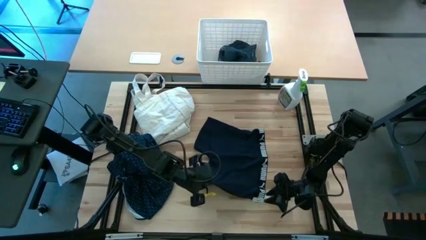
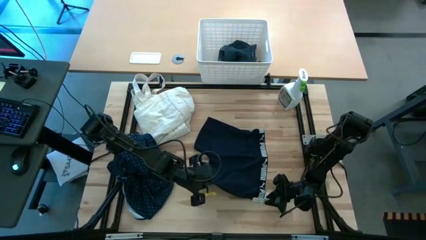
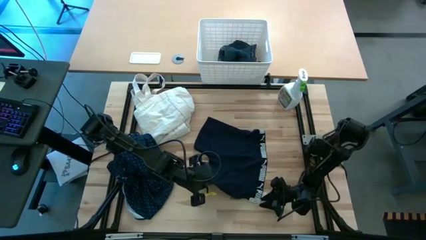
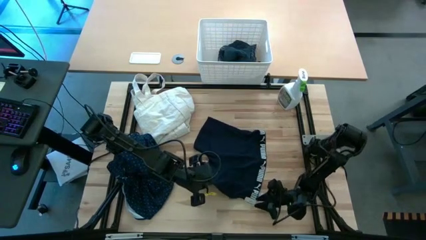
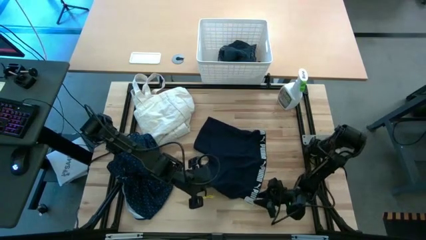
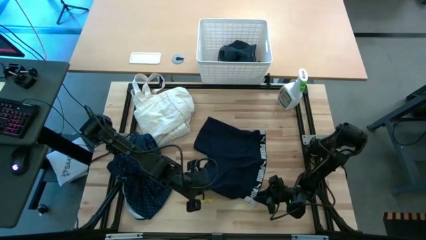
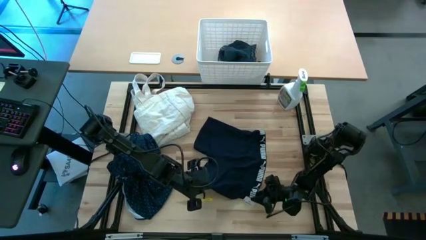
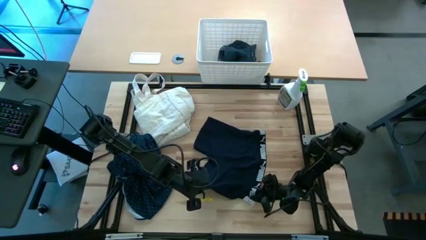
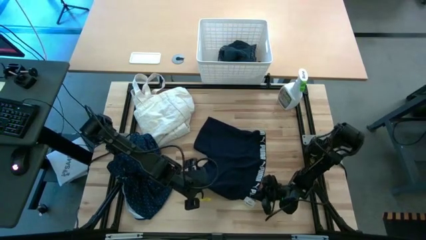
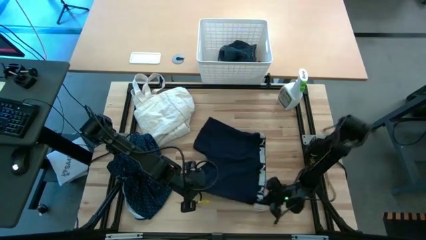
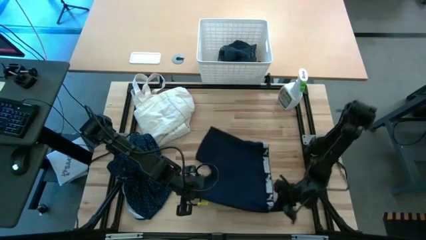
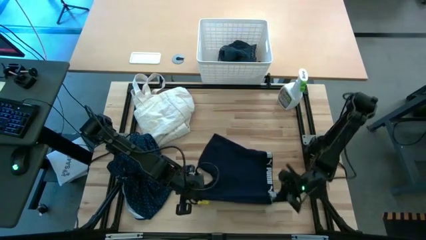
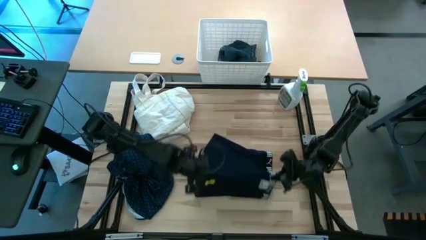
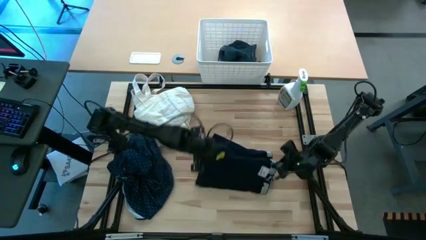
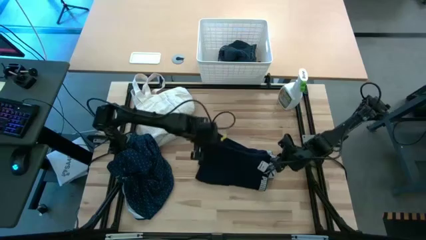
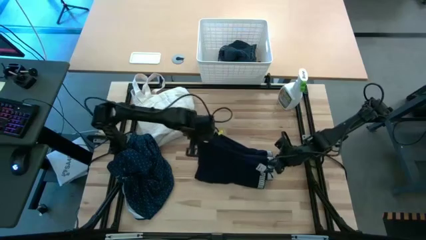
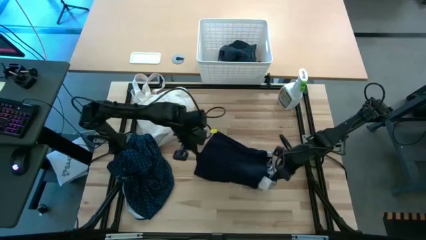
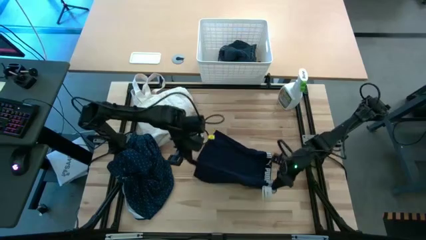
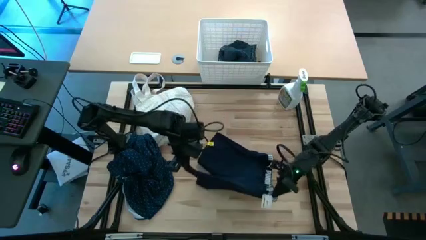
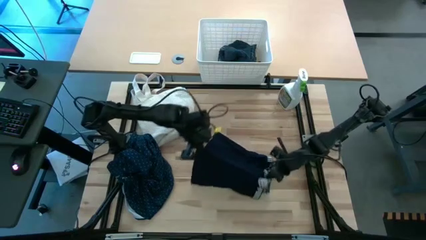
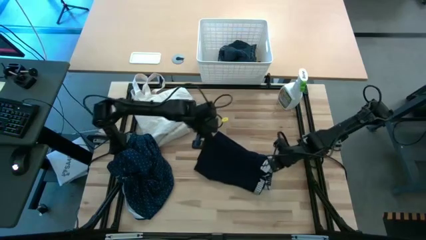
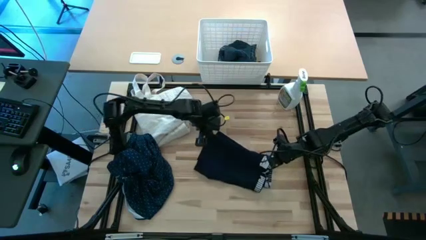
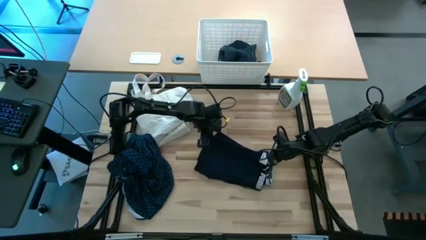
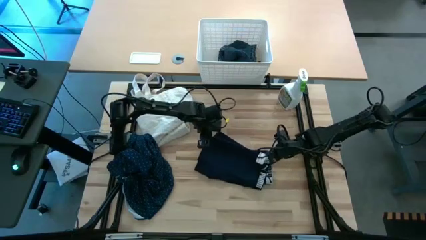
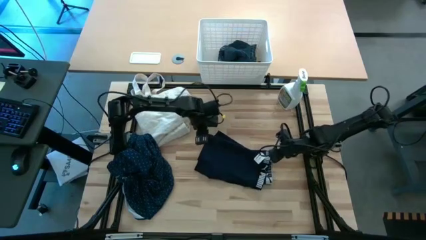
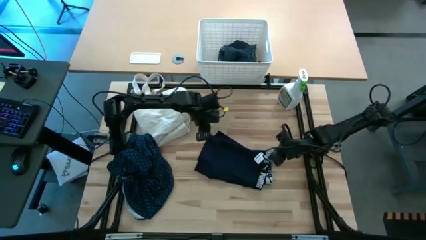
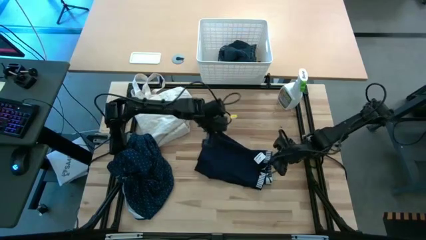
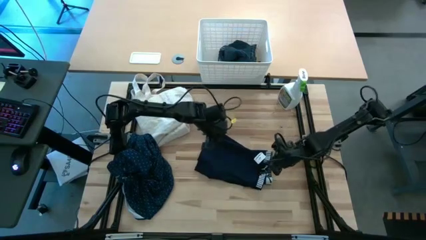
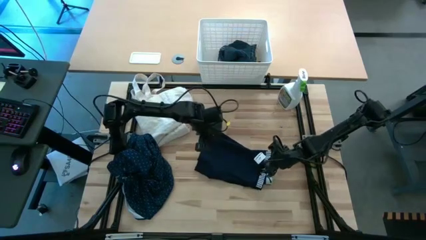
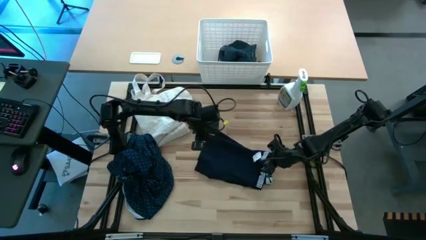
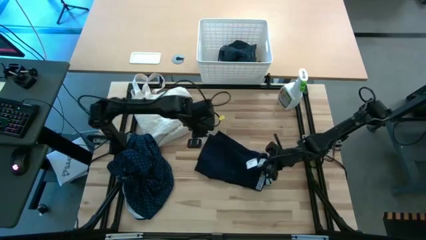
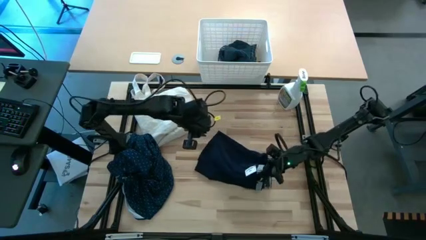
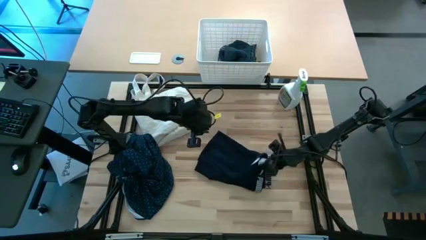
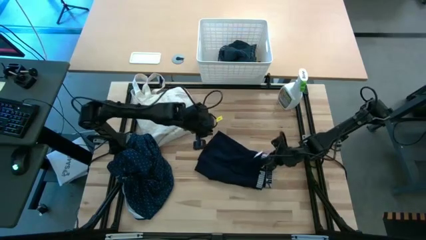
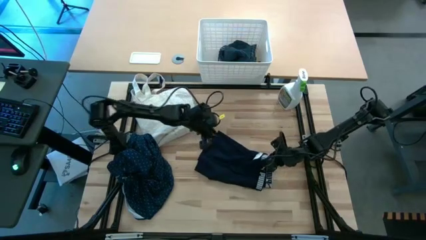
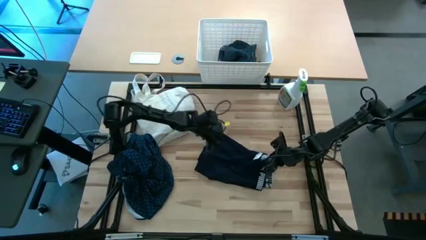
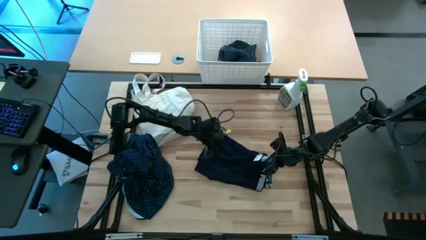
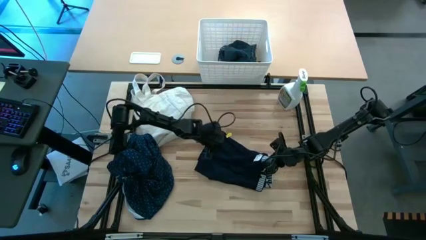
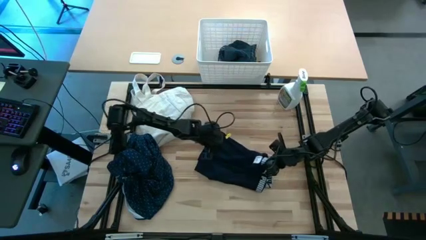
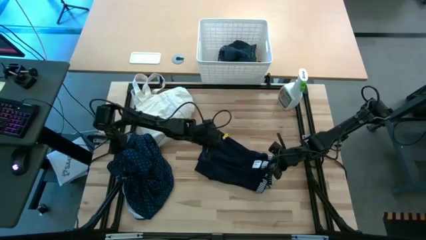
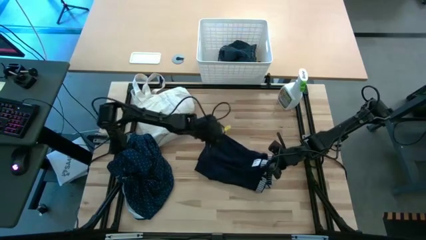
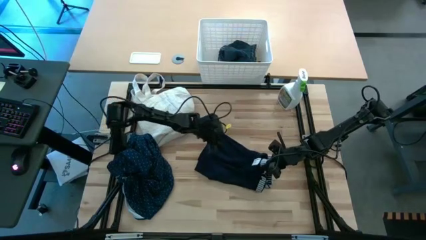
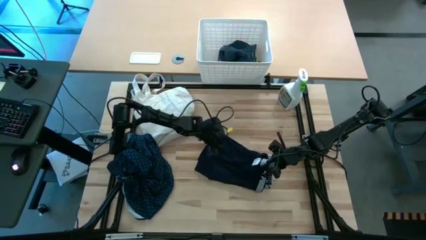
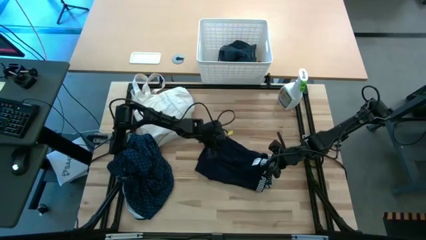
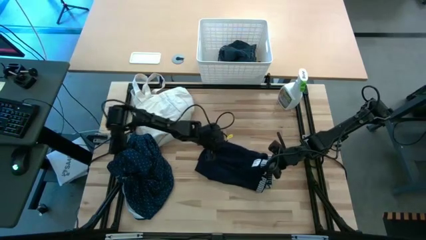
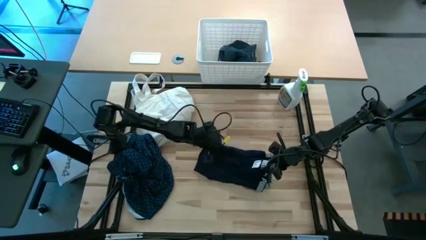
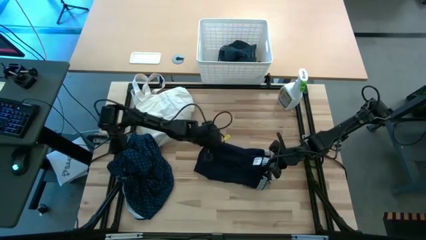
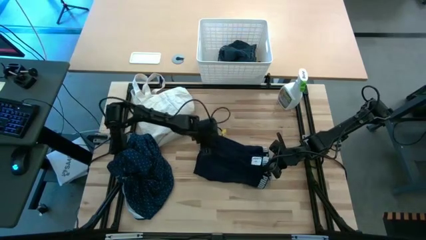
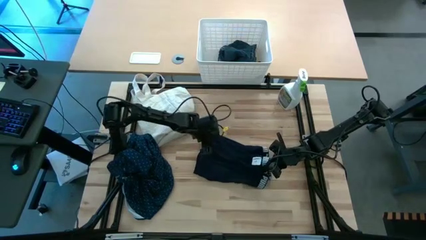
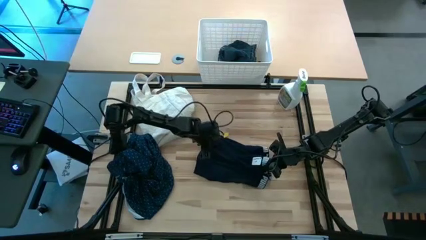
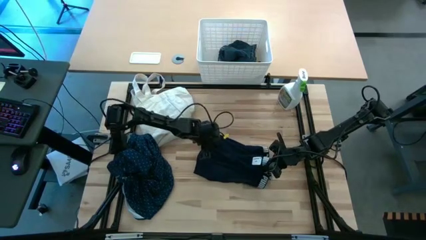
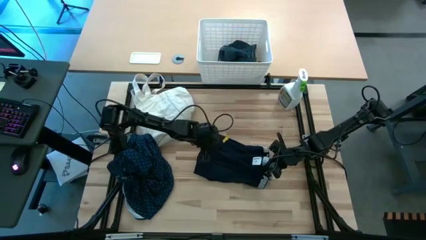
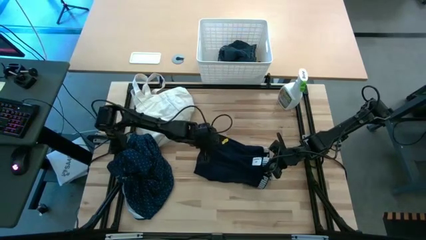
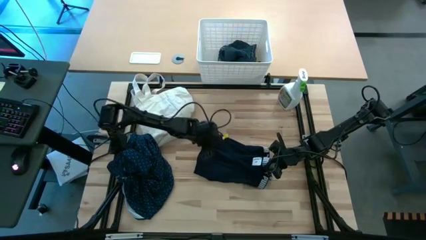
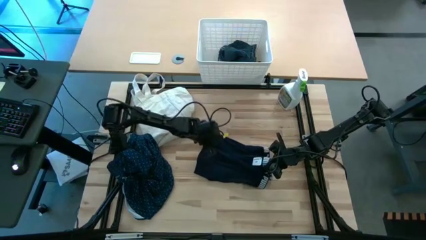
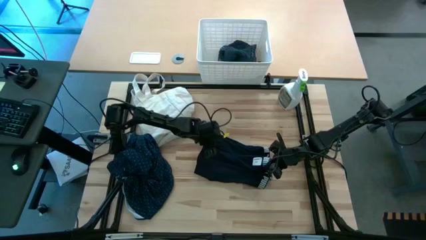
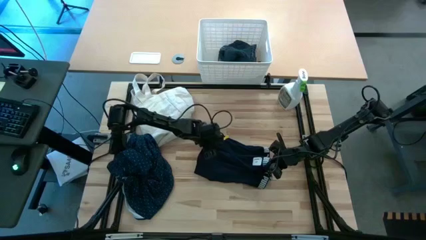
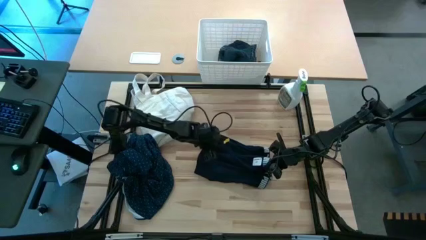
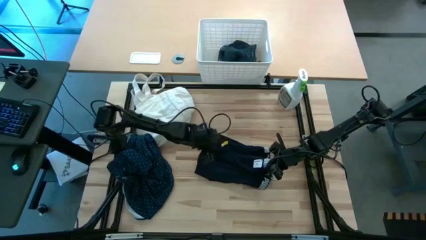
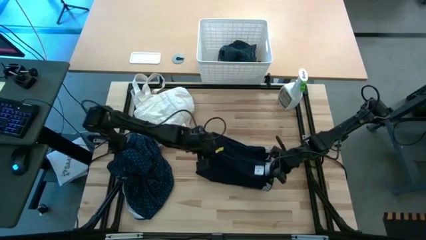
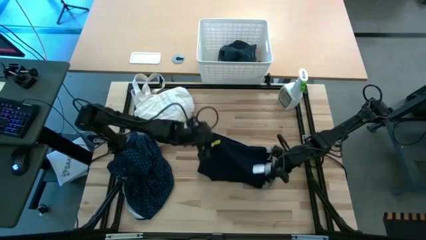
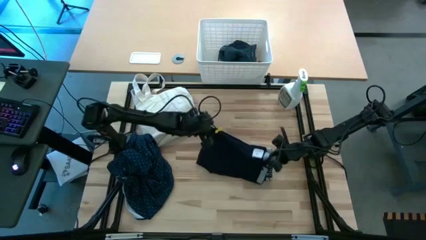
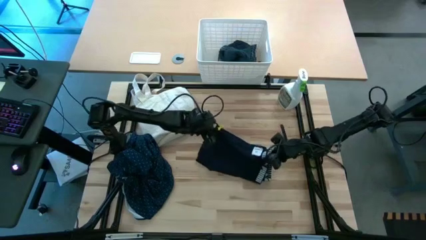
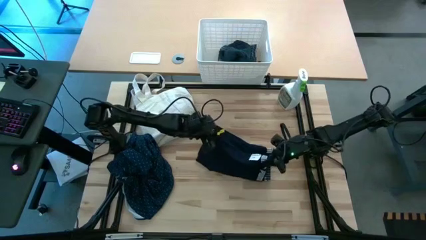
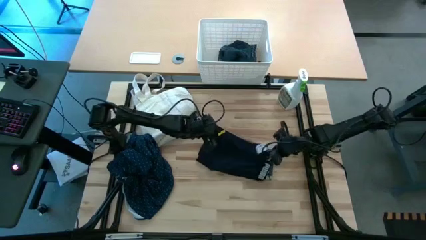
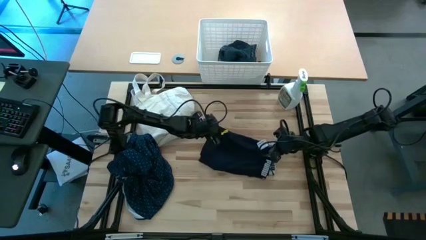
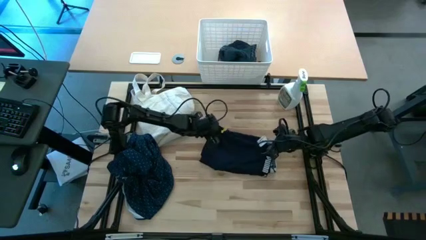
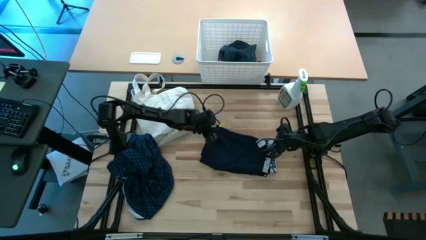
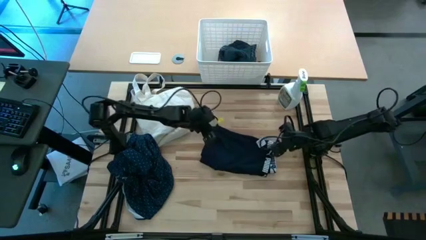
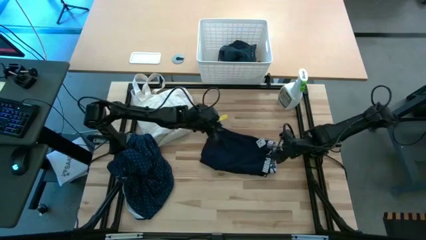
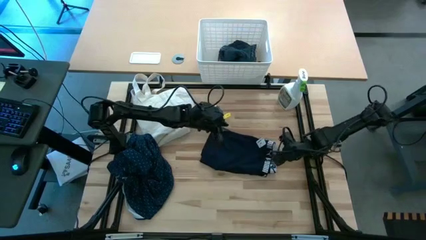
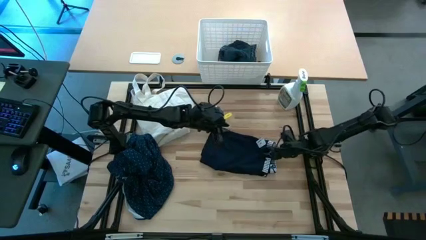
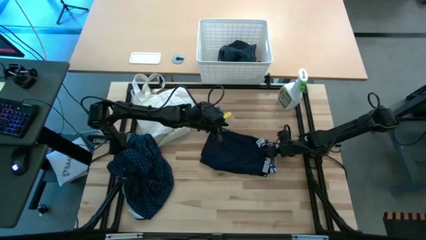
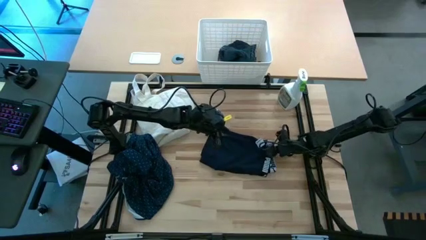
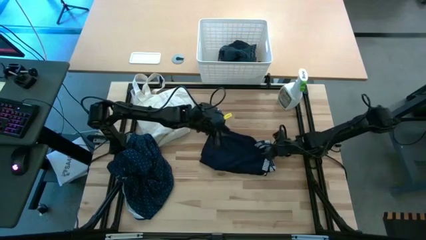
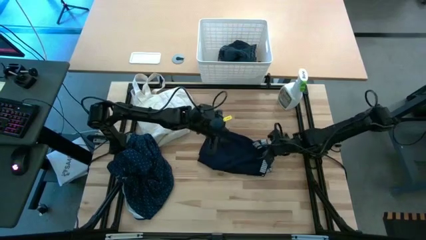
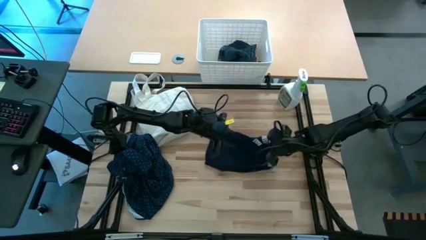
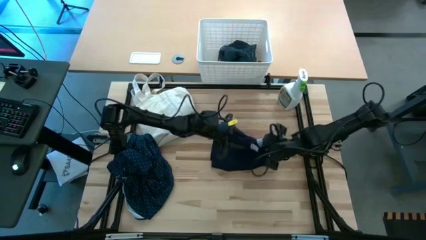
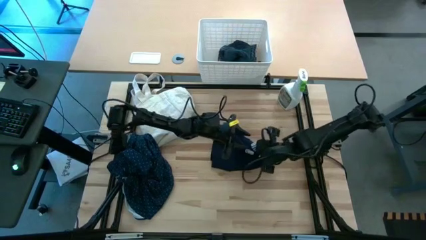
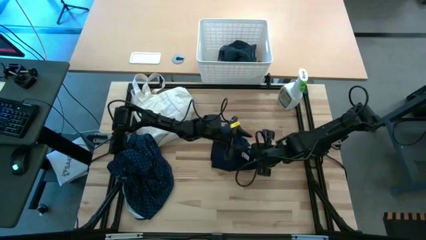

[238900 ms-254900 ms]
Fold the black boxer short
